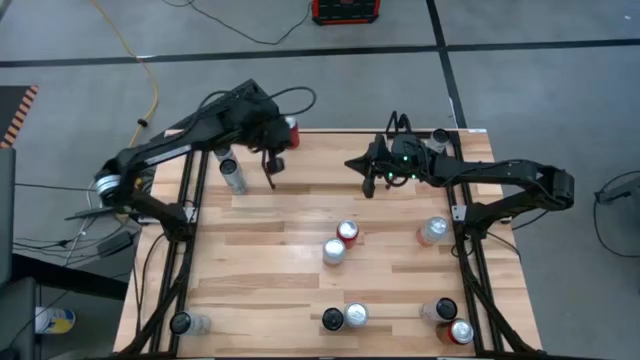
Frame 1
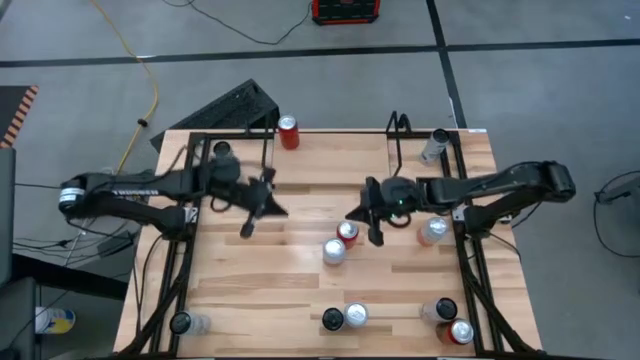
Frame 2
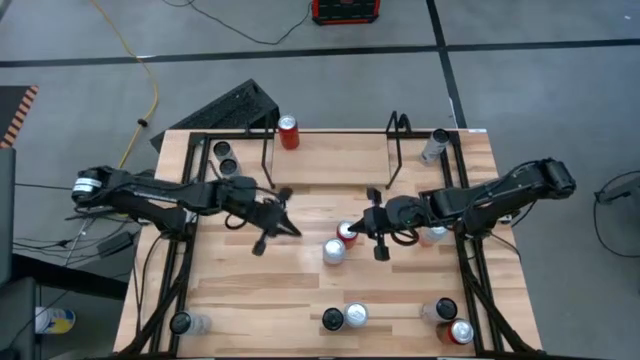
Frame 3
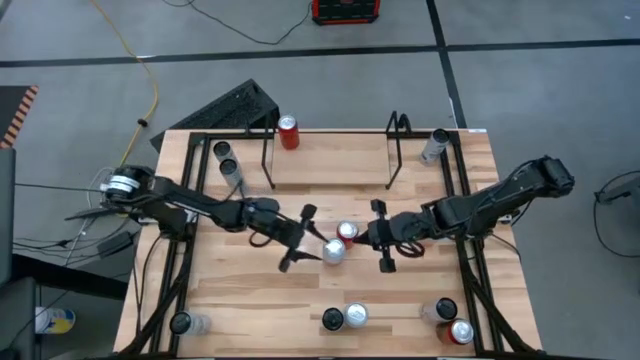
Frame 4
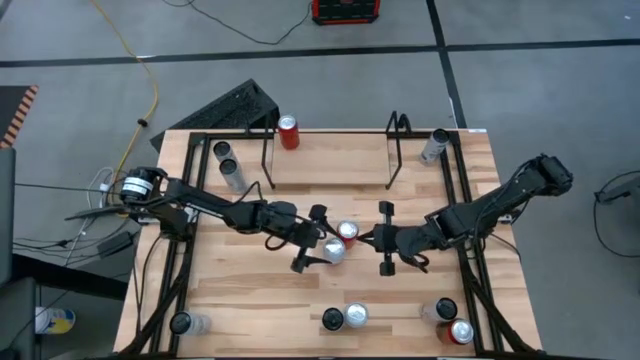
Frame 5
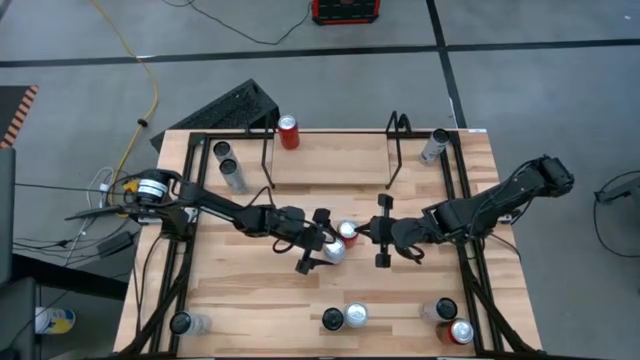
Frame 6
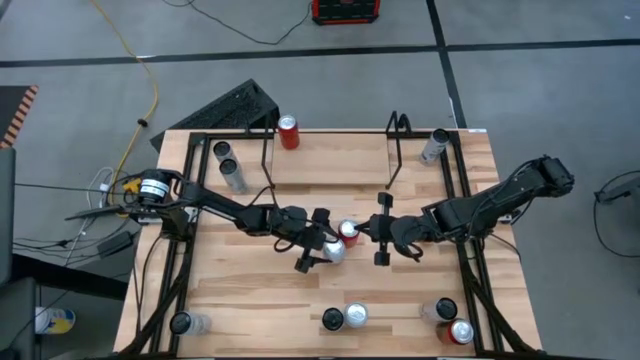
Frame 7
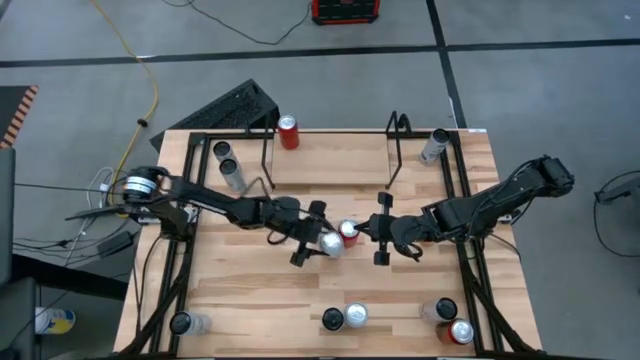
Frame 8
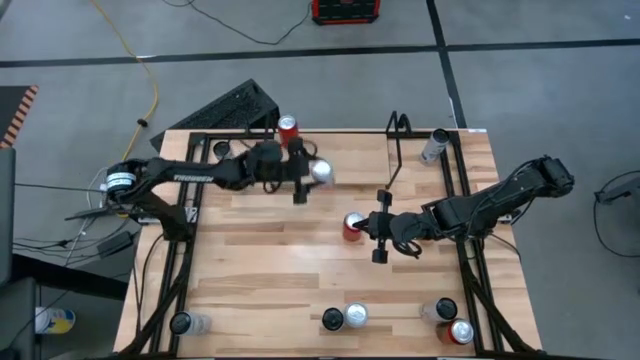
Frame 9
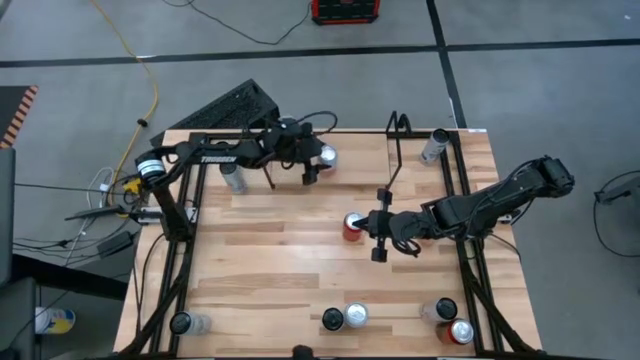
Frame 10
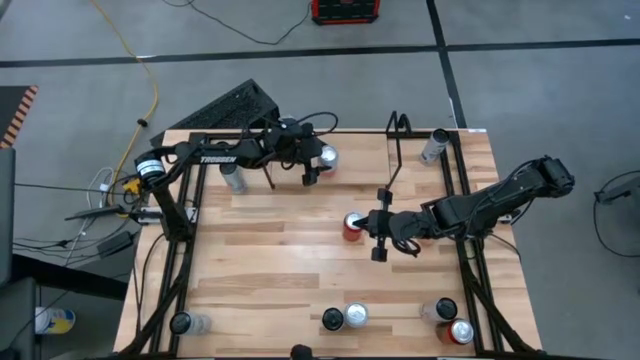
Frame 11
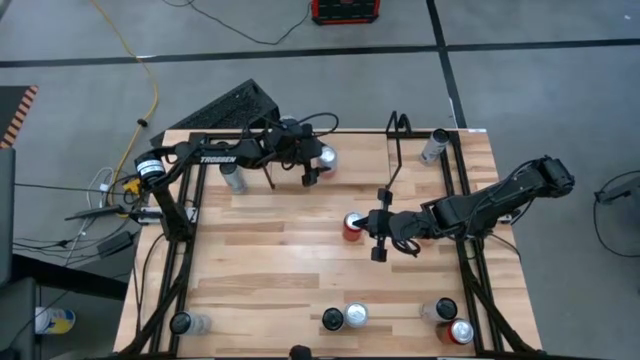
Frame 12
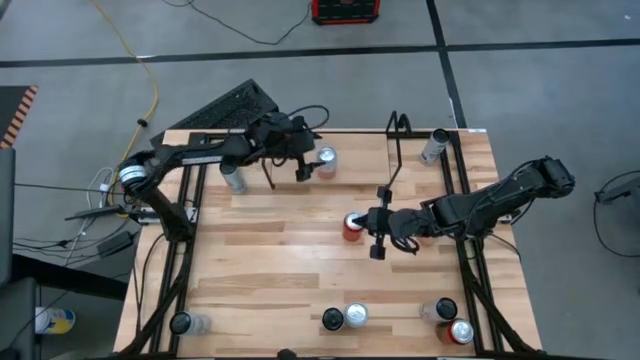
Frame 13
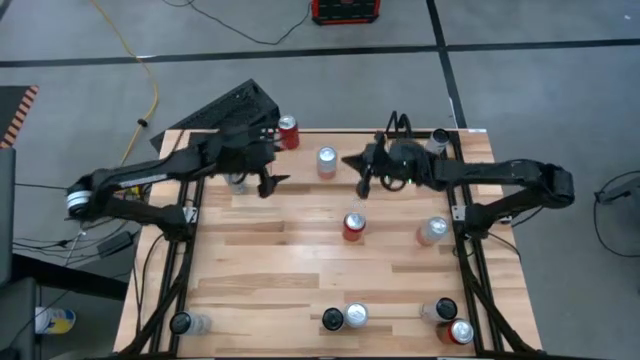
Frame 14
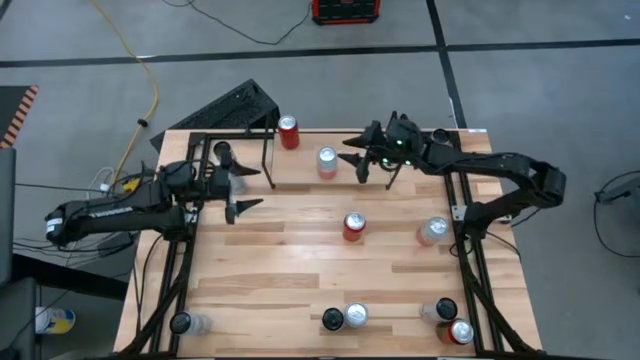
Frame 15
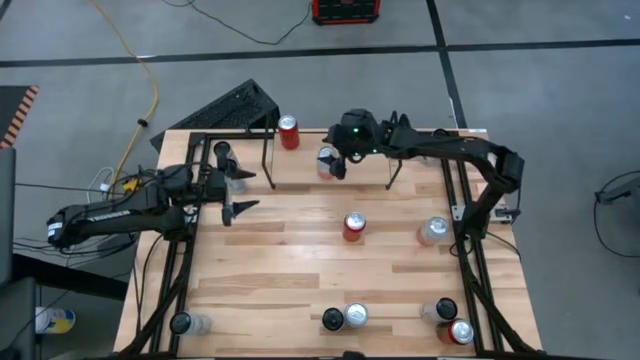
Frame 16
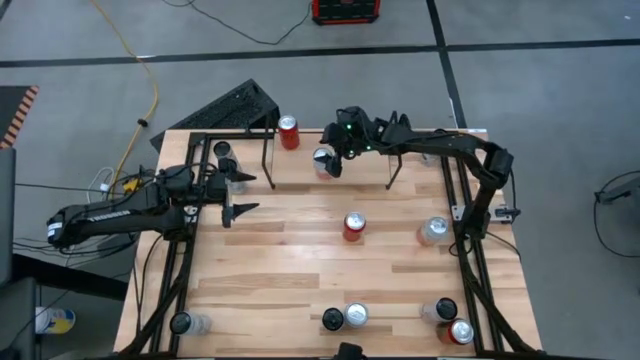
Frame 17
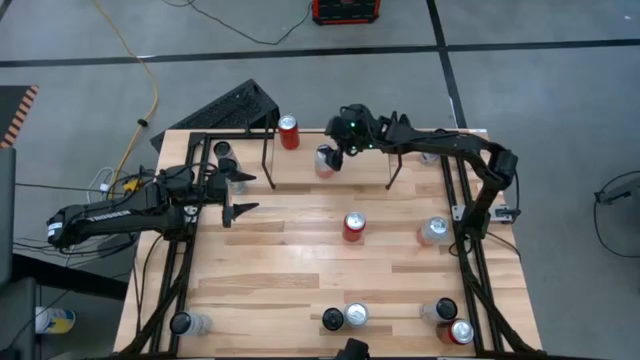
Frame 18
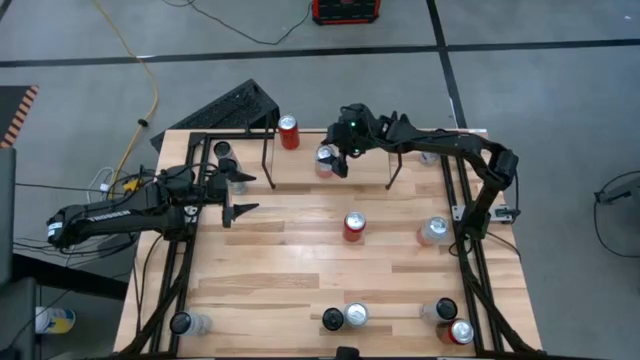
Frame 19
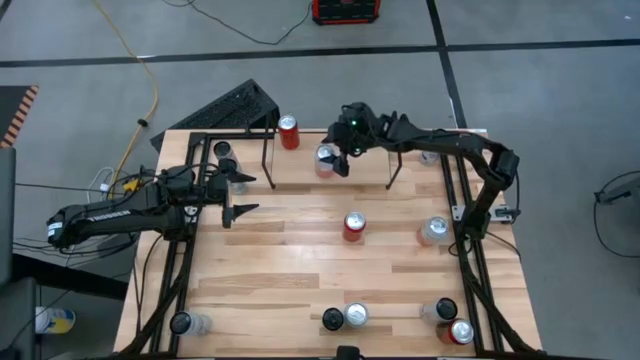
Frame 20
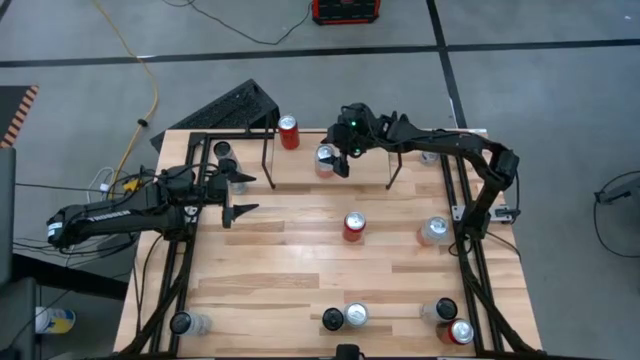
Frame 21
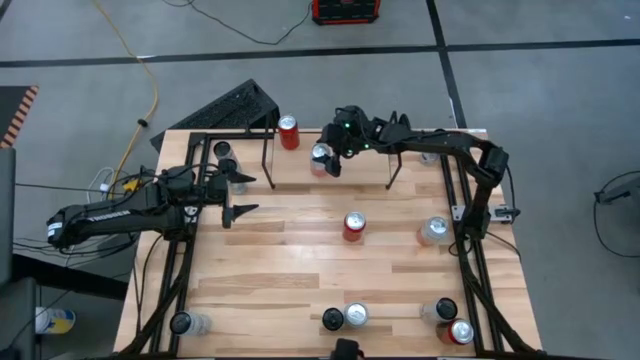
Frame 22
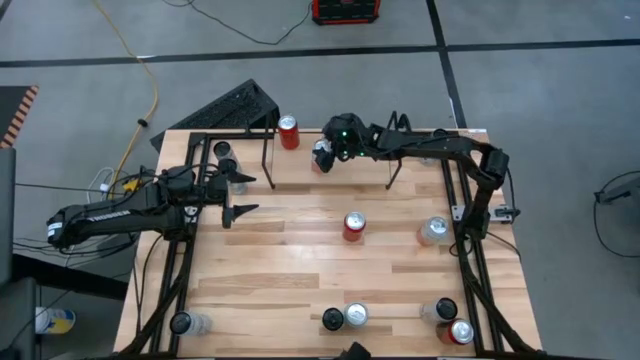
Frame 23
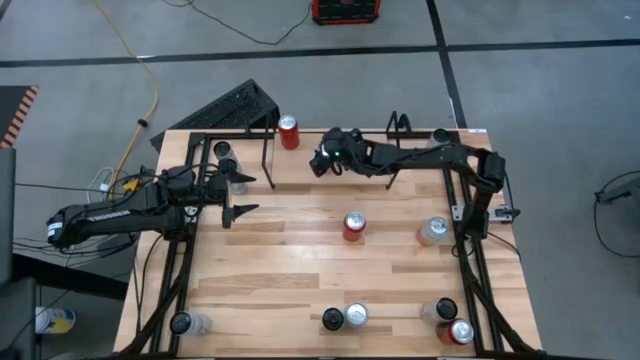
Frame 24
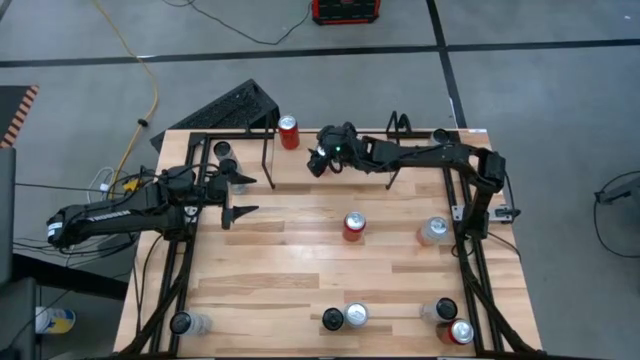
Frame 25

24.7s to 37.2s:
Task: Place canned beverage on shelf
Put the top left pink white soda can on the shelf

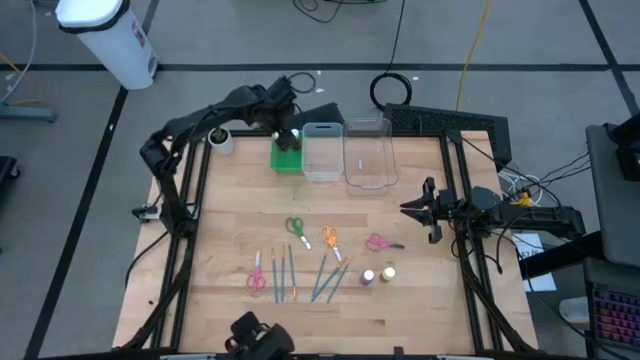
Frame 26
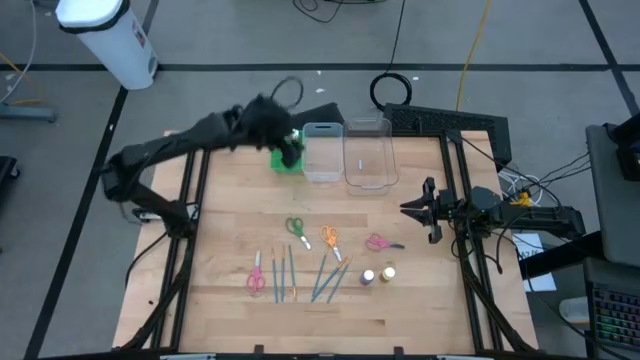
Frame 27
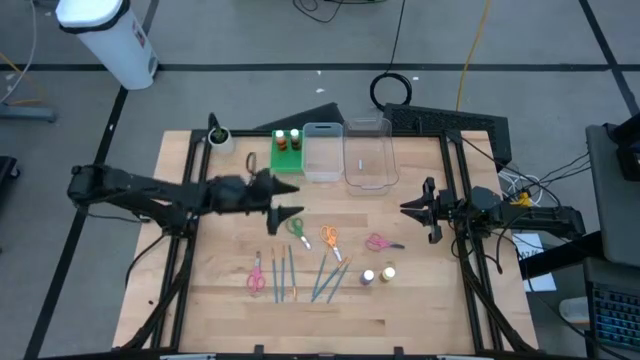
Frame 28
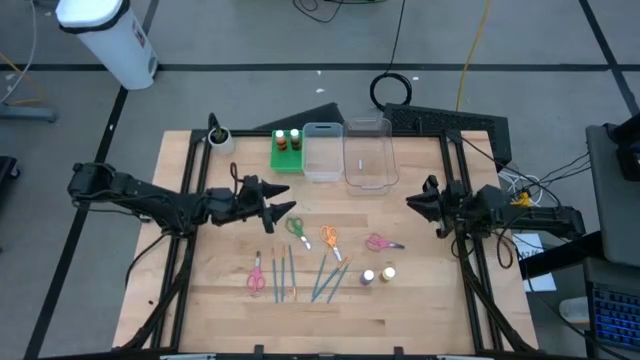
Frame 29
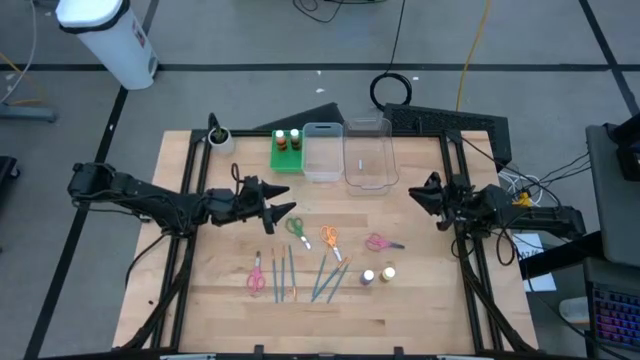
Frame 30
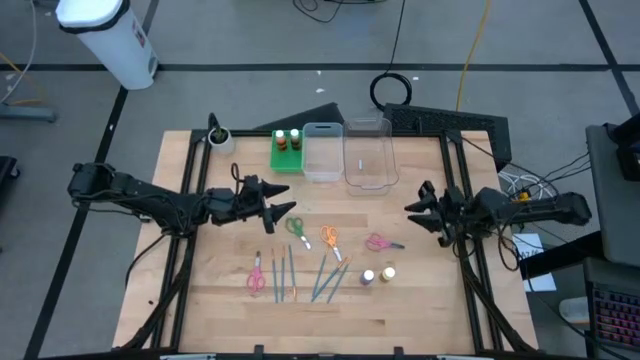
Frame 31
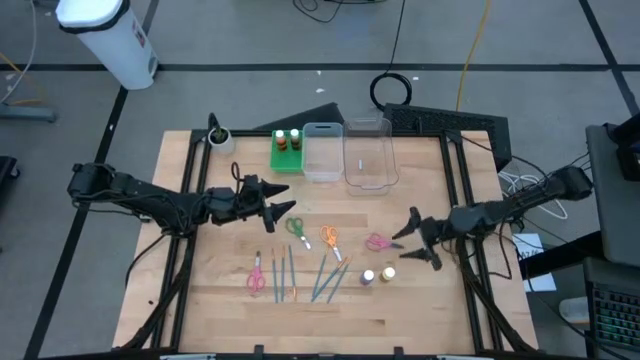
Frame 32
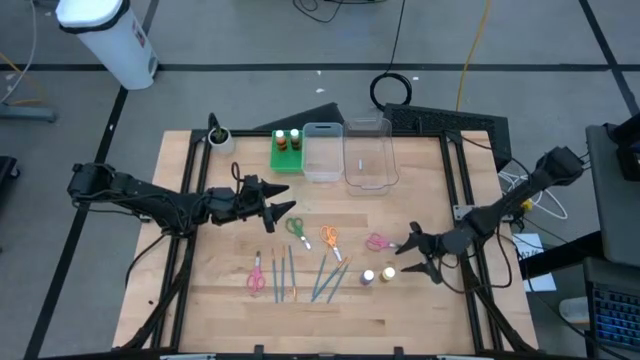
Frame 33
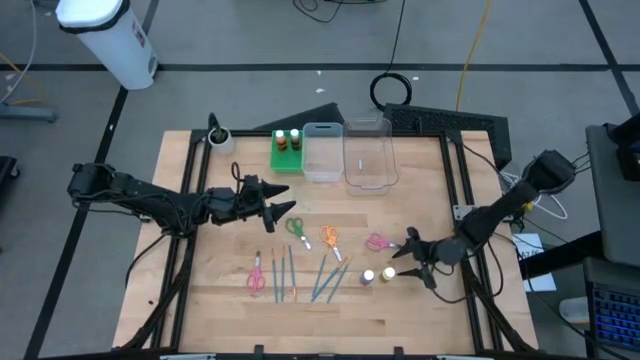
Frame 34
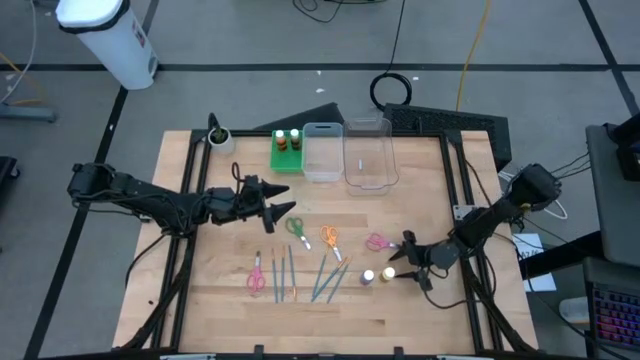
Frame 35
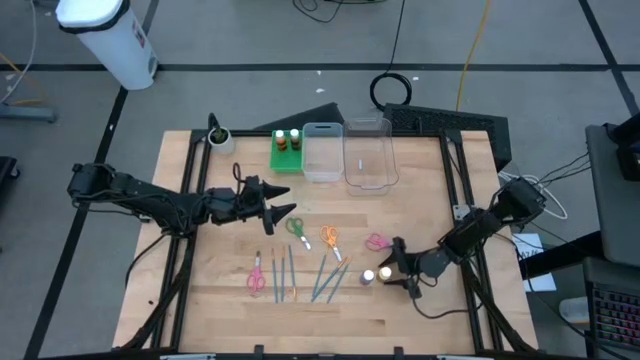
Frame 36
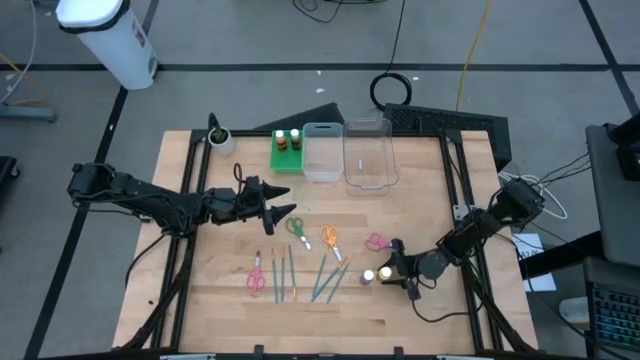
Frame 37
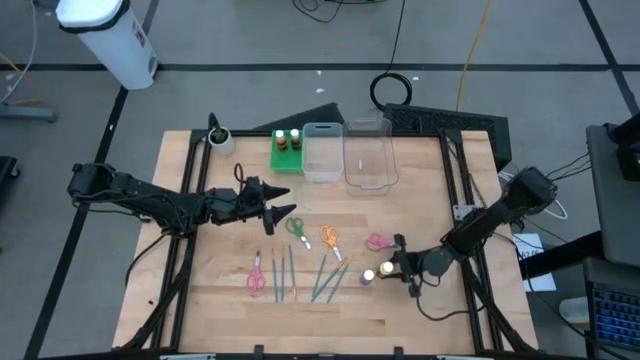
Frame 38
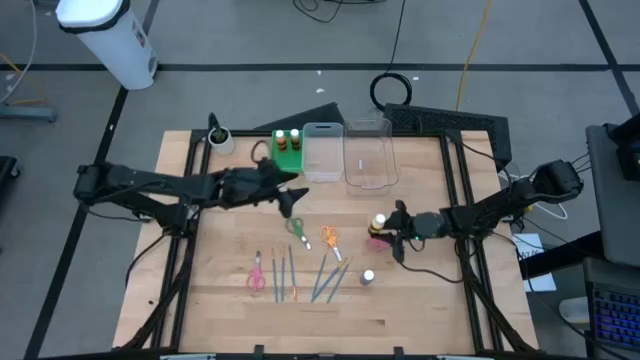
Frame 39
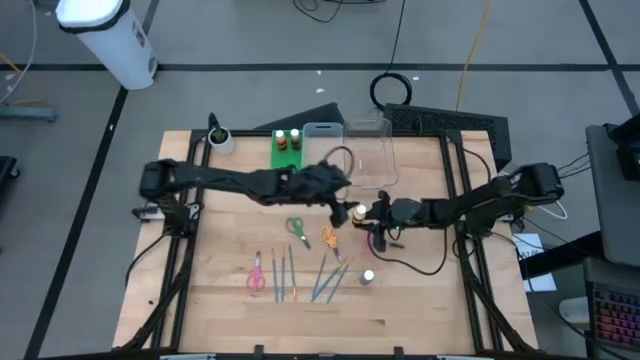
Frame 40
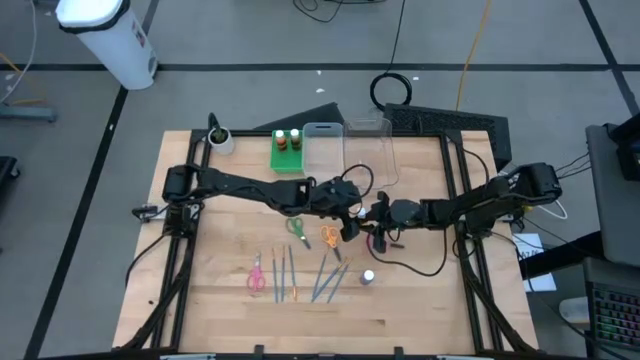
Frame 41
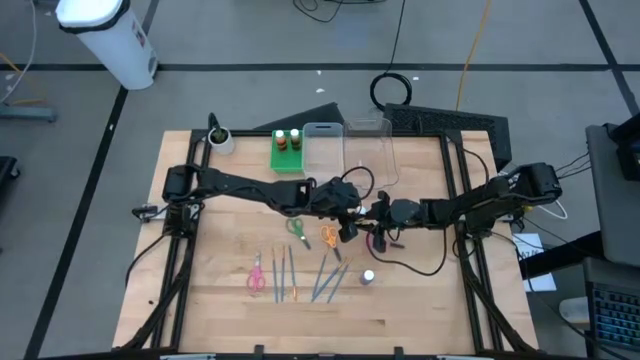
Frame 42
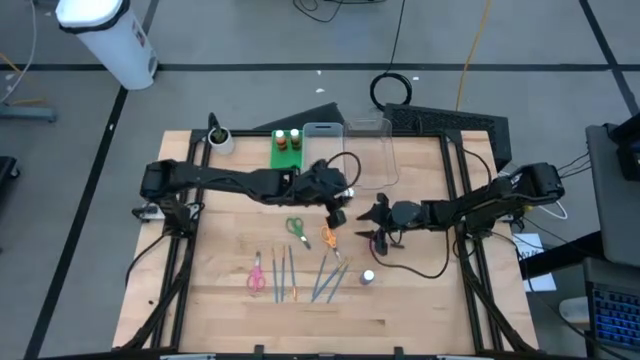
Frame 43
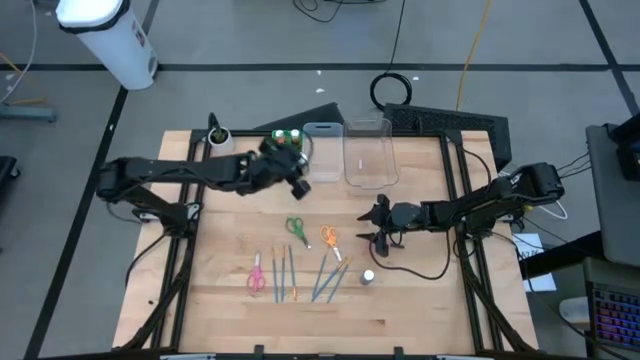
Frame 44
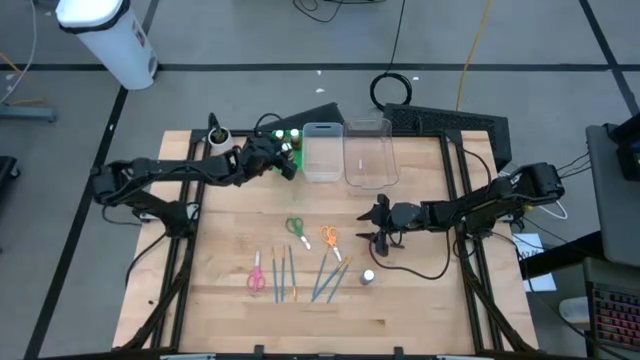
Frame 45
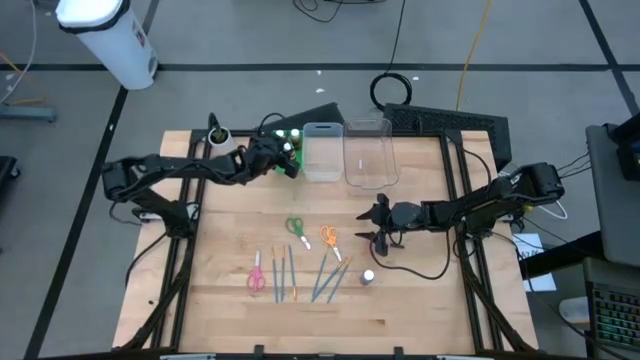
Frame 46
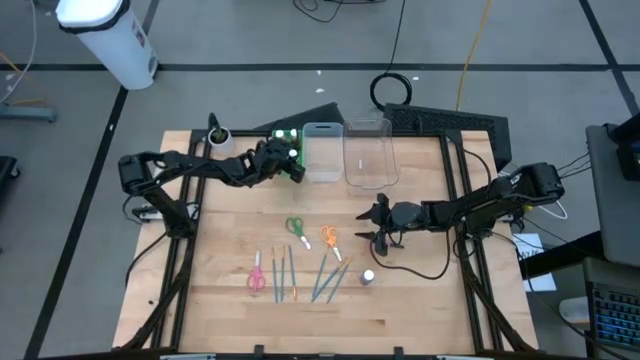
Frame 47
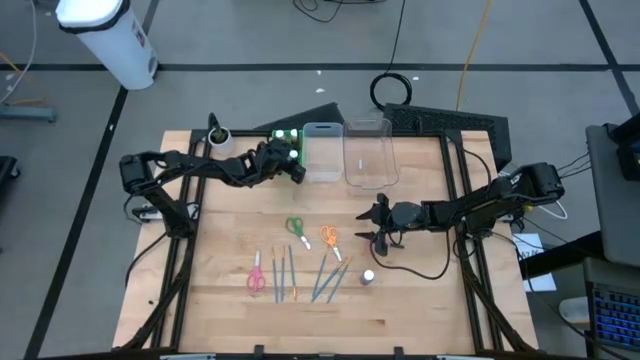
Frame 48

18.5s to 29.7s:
Task: Pick & Place Paint Supplies
Put the yellow paint bottle into the green bin
